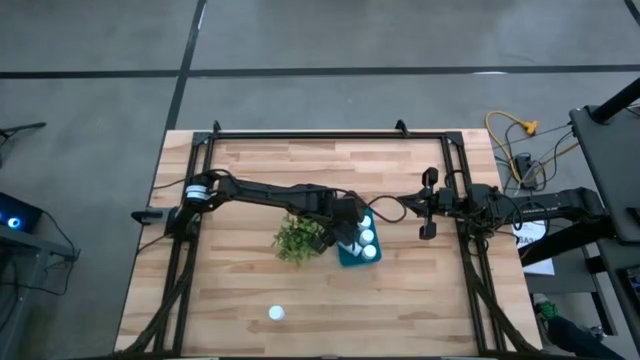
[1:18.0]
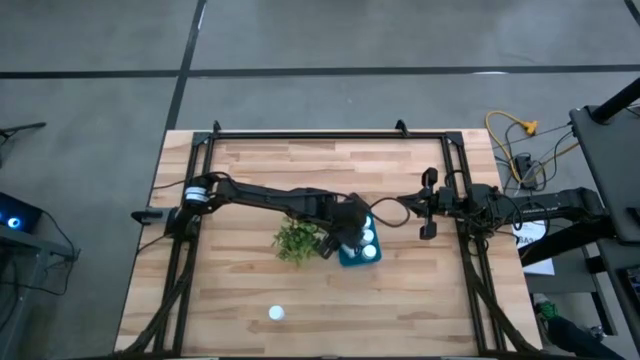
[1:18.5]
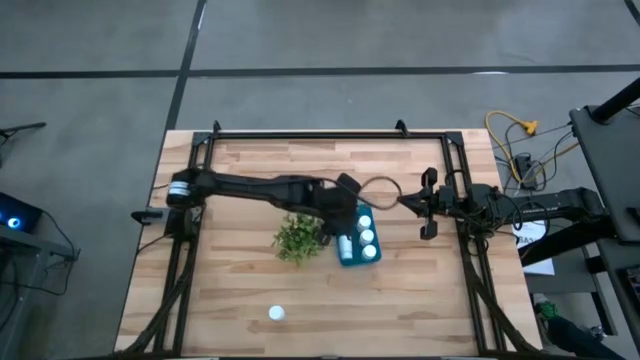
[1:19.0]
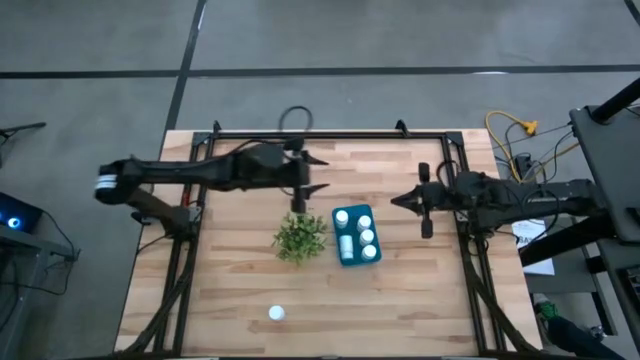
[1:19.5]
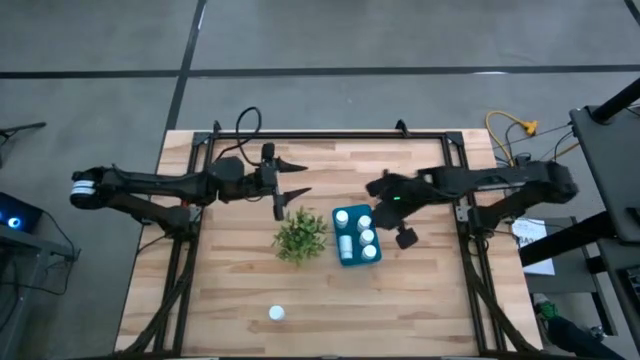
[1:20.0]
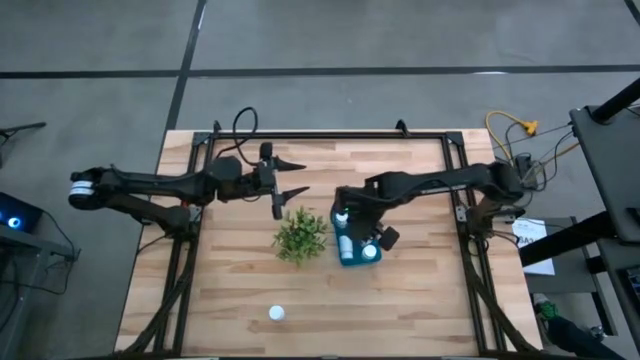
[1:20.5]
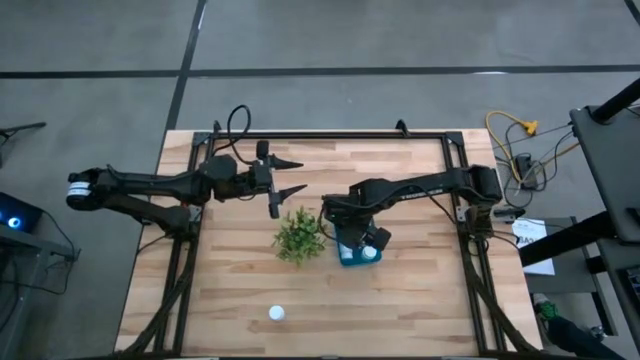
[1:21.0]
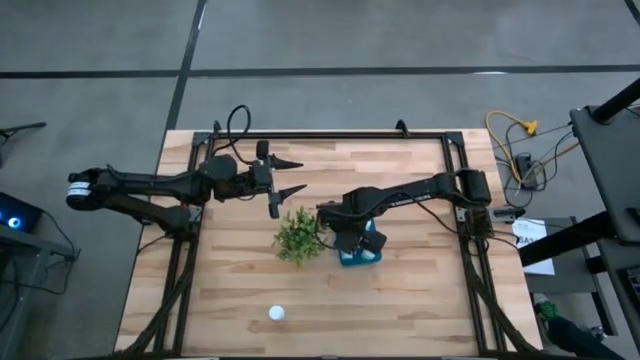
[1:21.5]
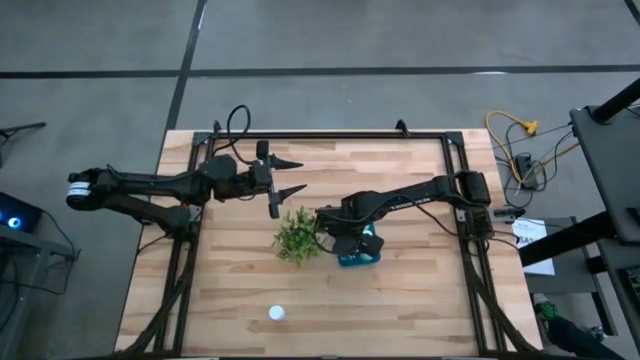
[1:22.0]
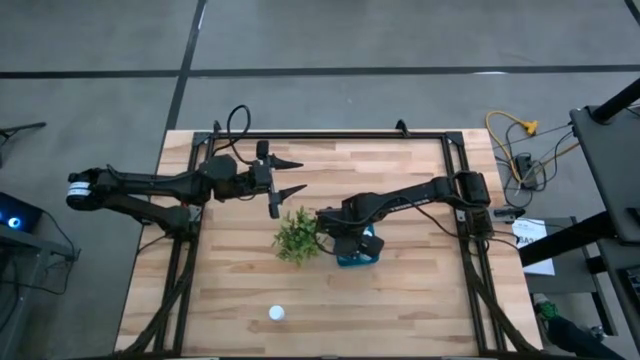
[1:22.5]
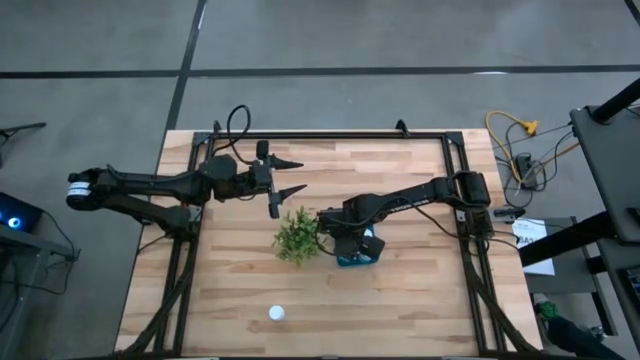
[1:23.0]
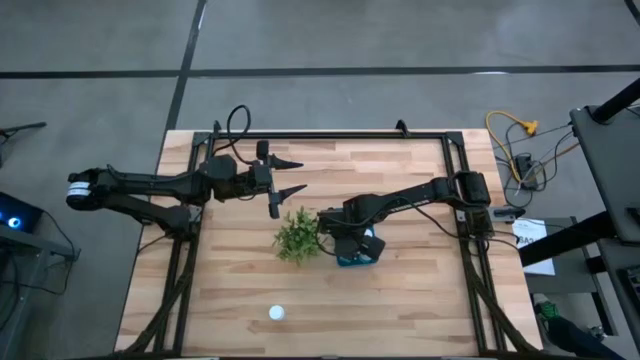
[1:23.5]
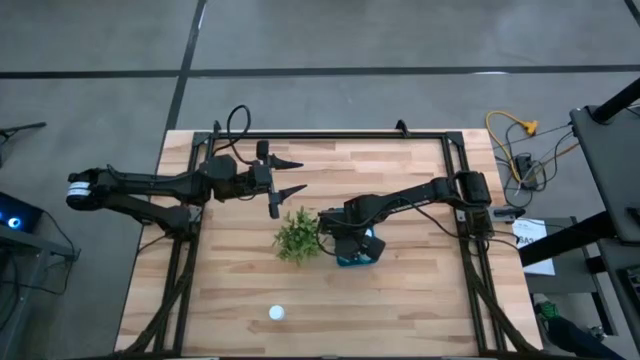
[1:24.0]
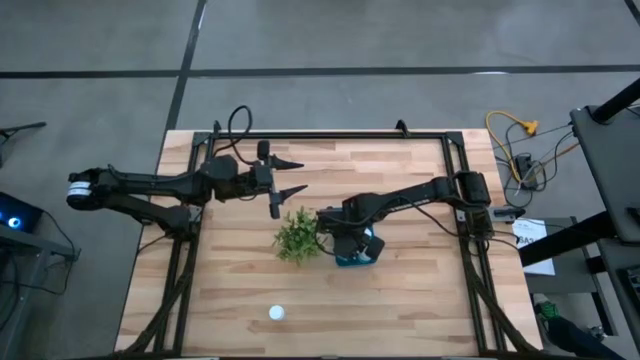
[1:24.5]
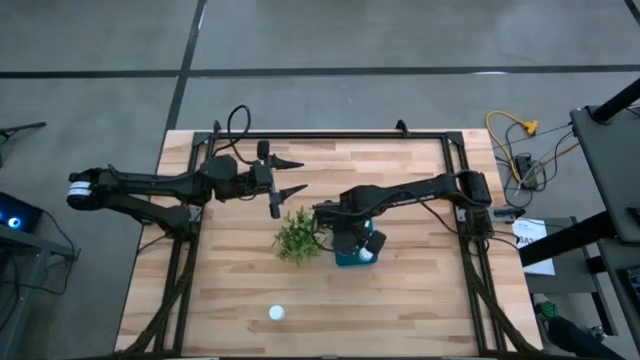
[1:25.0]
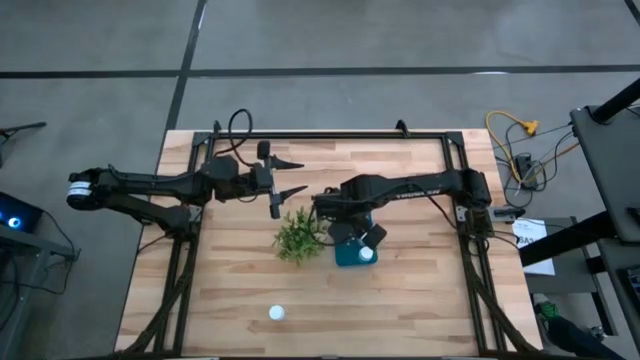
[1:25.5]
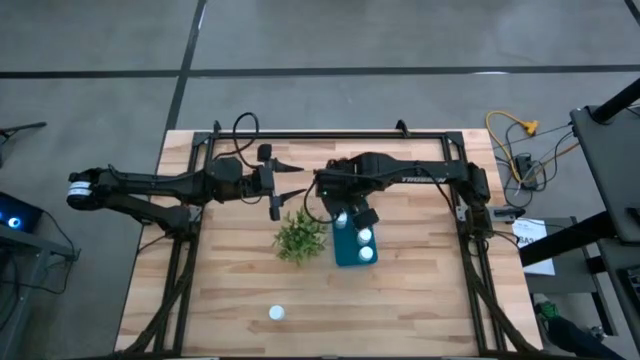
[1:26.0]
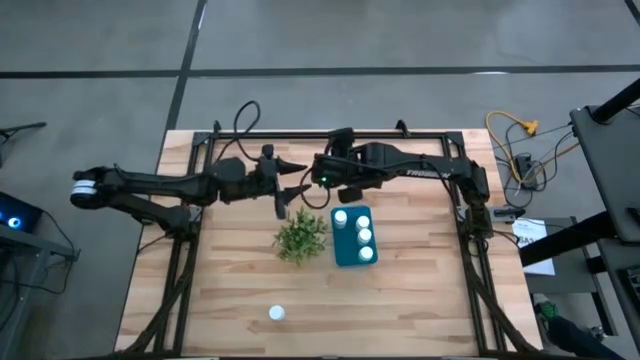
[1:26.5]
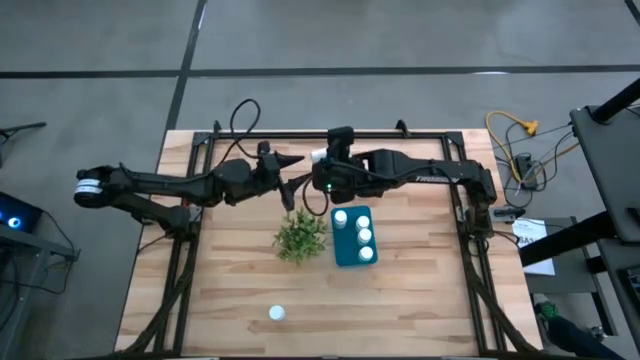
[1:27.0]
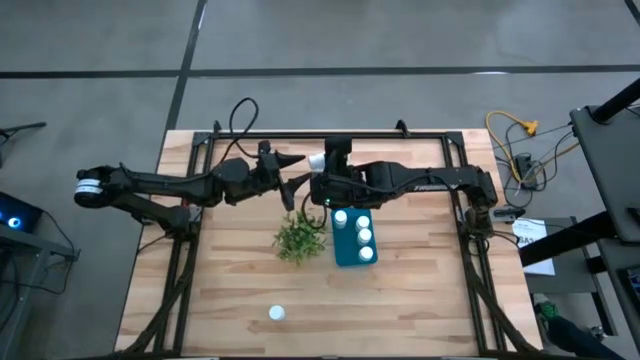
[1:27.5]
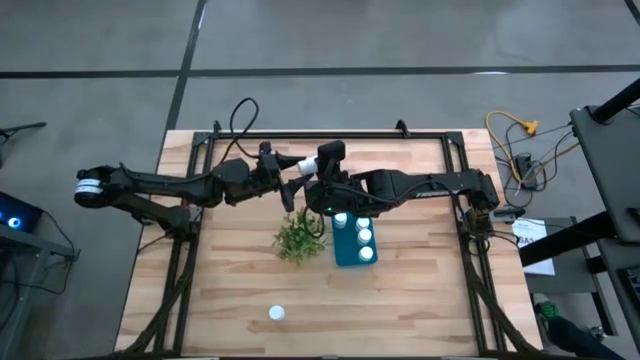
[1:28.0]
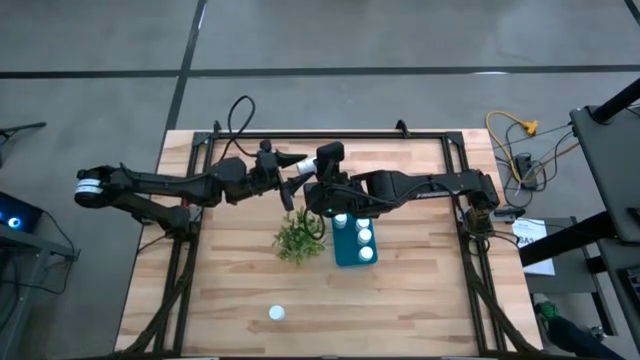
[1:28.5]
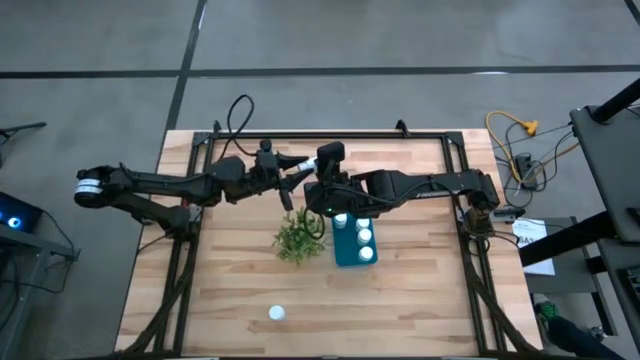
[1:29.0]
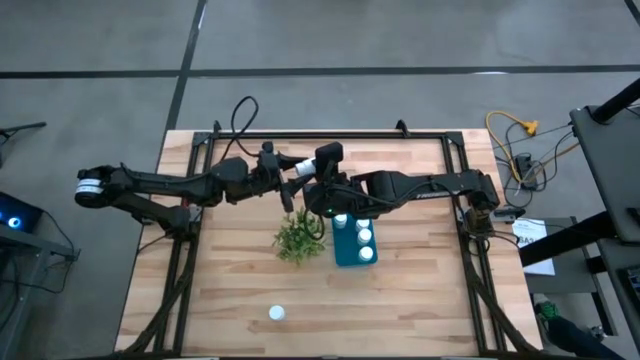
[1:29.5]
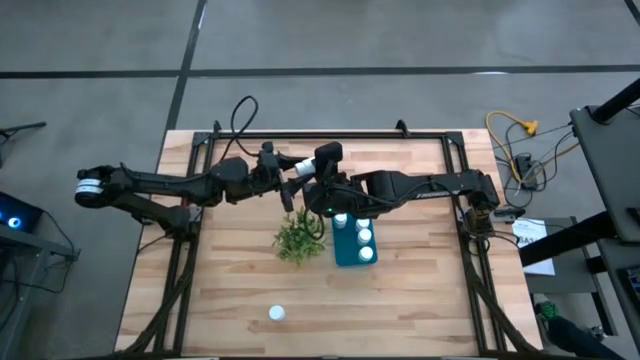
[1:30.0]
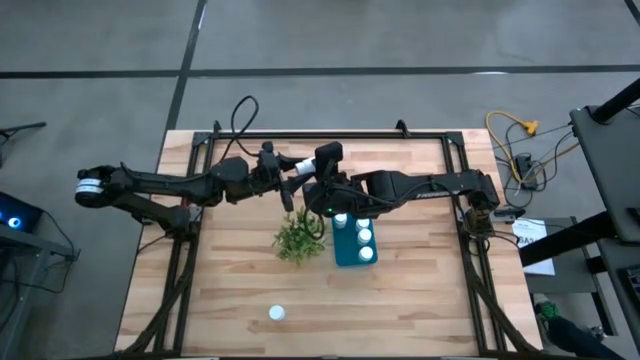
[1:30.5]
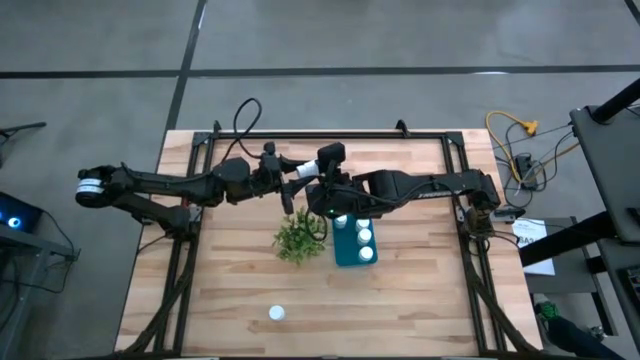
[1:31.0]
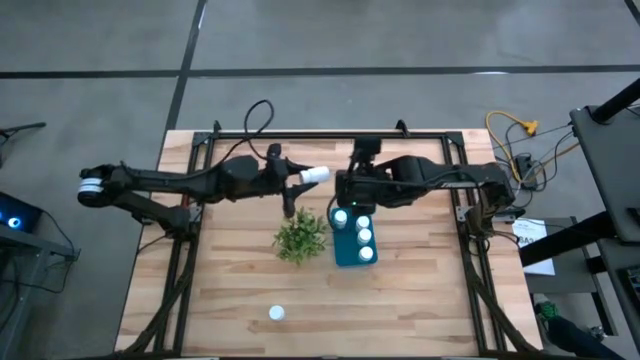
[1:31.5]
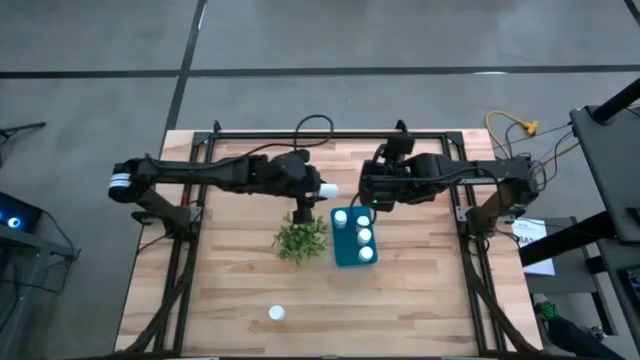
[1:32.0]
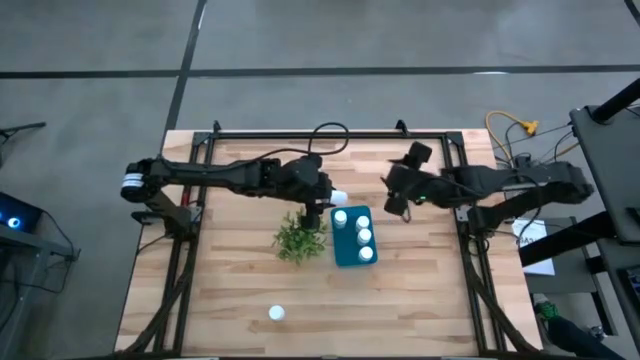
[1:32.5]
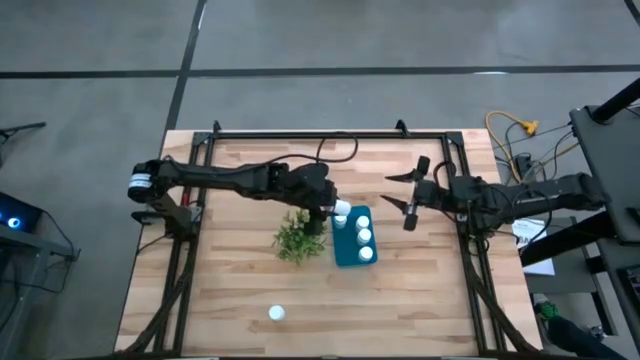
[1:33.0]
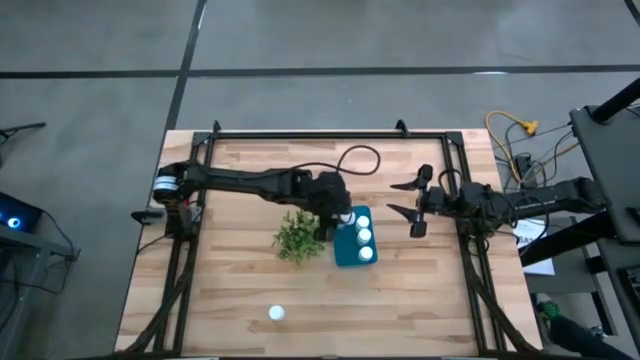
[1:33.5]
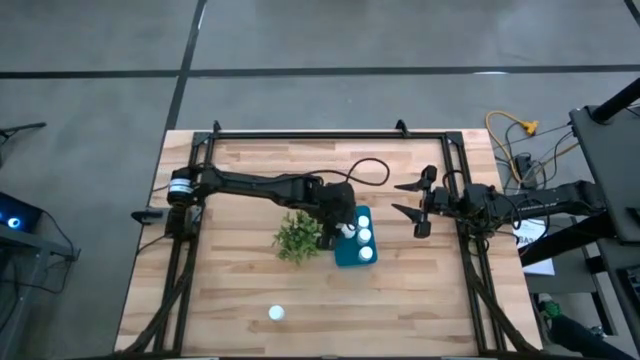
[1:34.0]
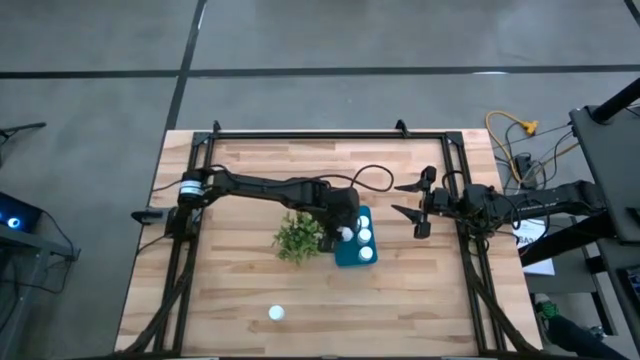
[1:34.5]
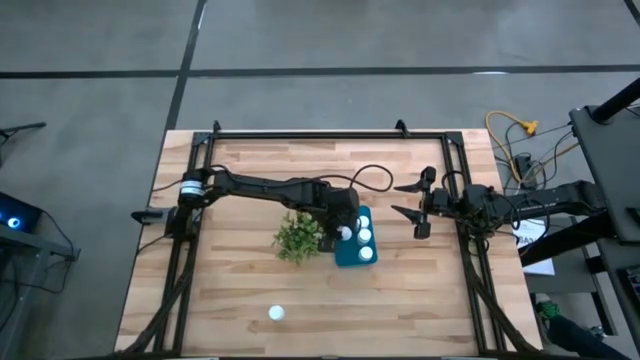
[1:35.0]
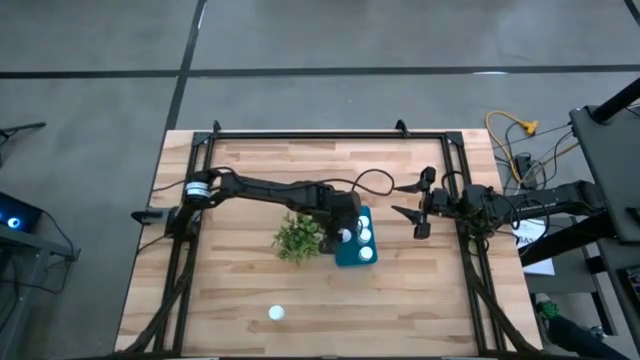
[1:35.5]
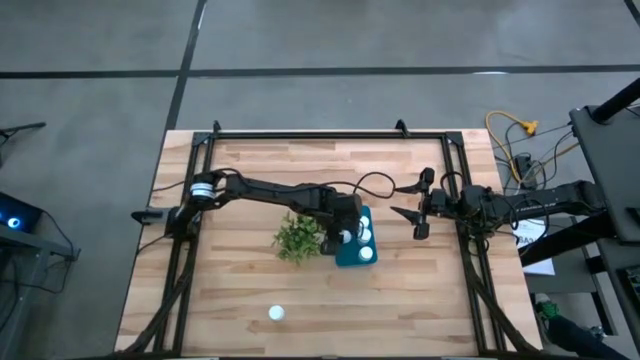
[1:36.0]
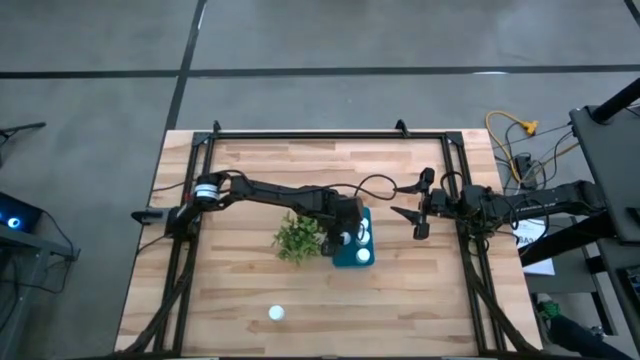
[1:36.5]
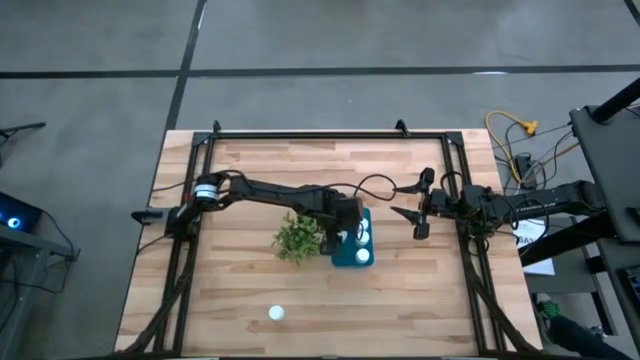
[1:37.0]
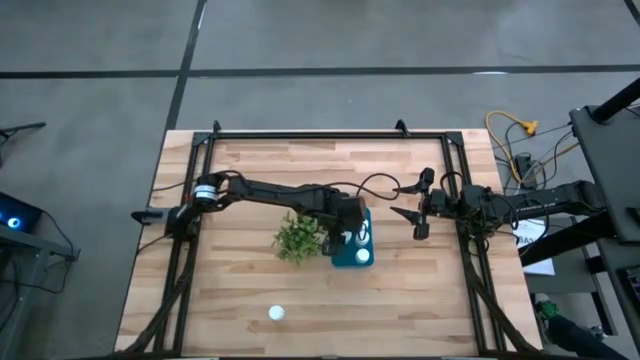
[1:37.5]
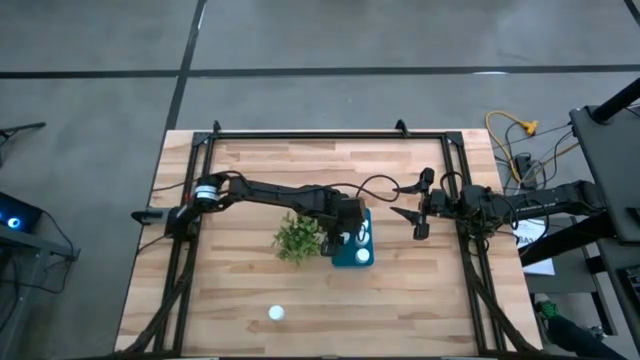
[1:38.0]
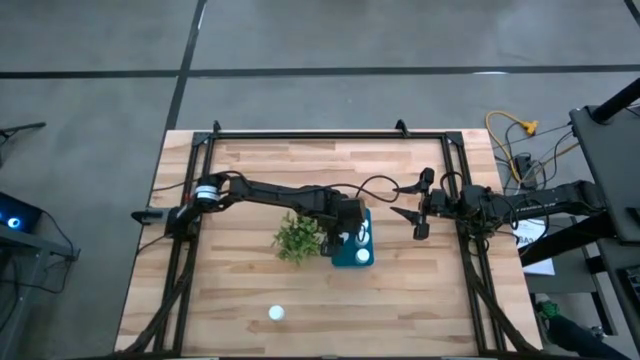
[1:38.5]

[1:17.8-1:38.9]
Task: Pick and place pill bottles into a basket
Put the white medicine bottle into the blue bin
